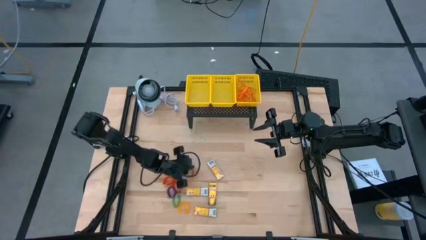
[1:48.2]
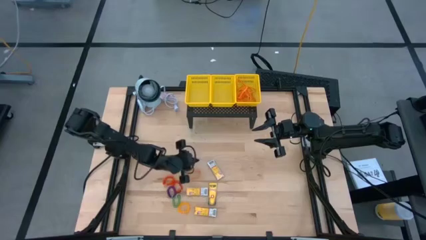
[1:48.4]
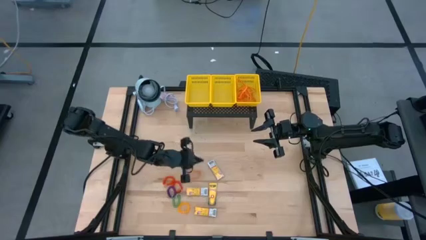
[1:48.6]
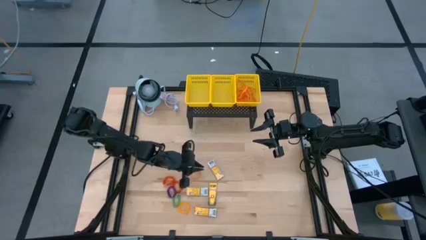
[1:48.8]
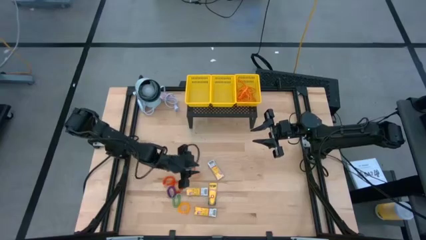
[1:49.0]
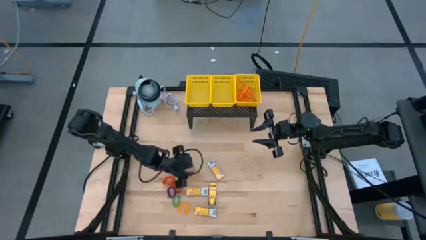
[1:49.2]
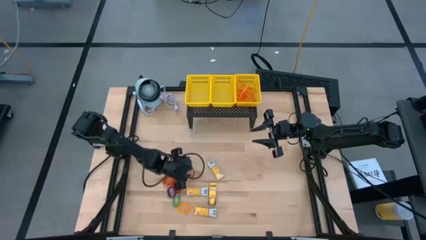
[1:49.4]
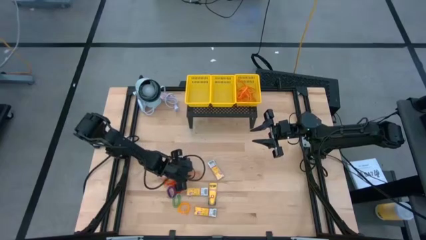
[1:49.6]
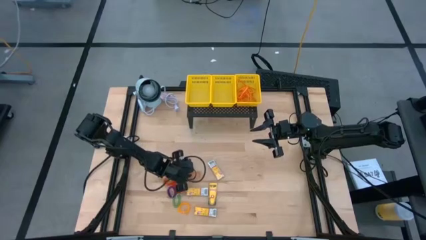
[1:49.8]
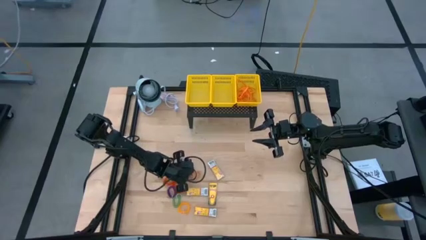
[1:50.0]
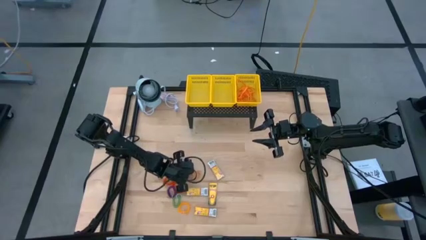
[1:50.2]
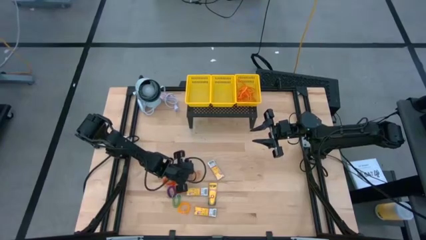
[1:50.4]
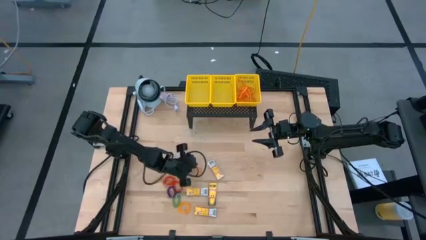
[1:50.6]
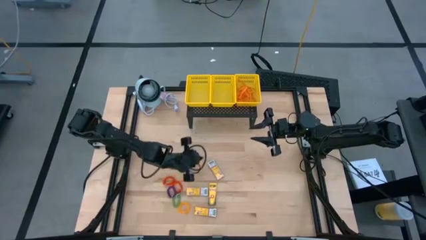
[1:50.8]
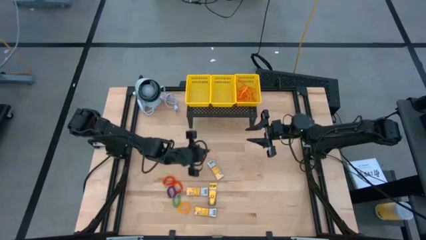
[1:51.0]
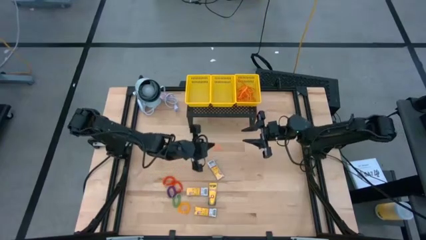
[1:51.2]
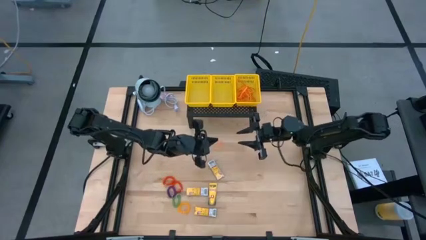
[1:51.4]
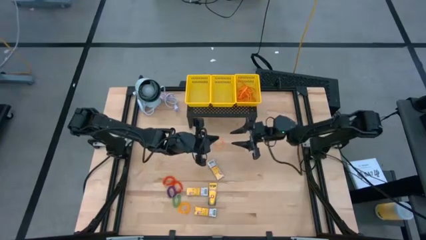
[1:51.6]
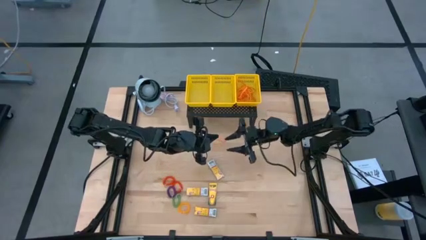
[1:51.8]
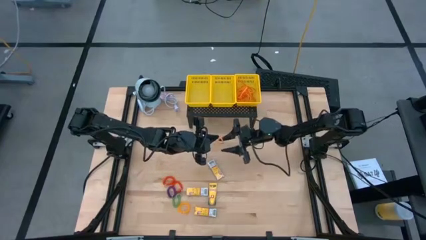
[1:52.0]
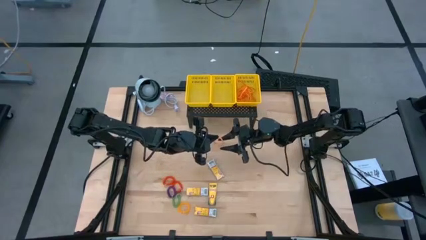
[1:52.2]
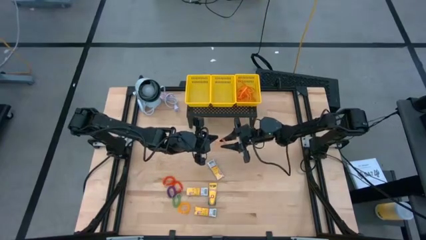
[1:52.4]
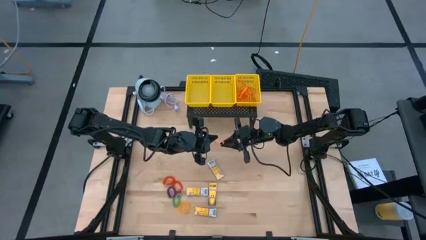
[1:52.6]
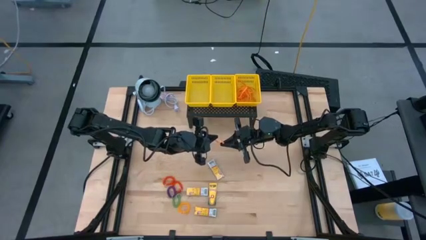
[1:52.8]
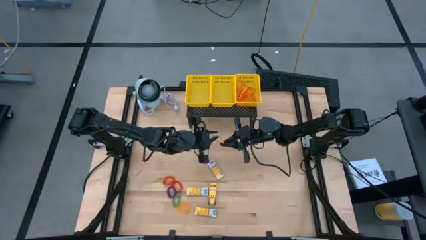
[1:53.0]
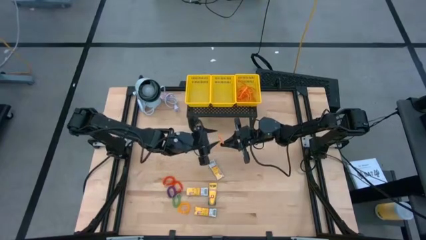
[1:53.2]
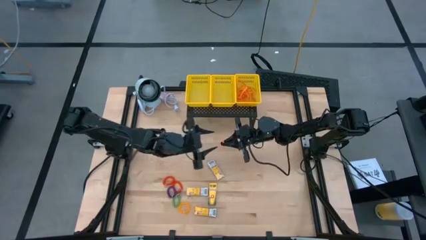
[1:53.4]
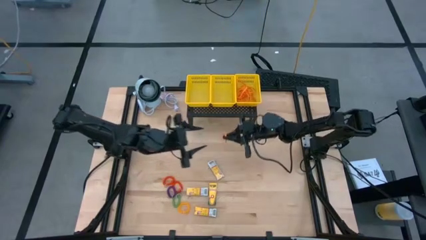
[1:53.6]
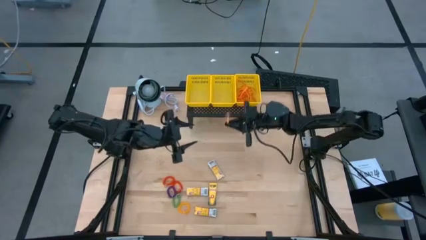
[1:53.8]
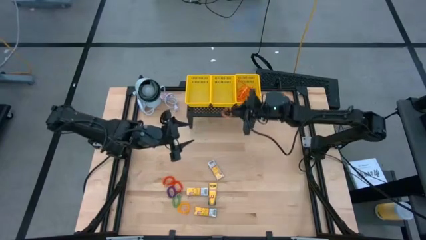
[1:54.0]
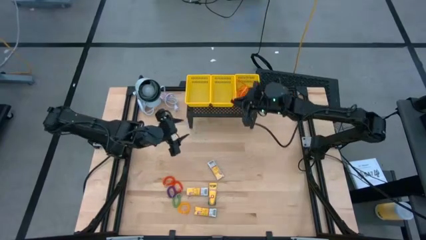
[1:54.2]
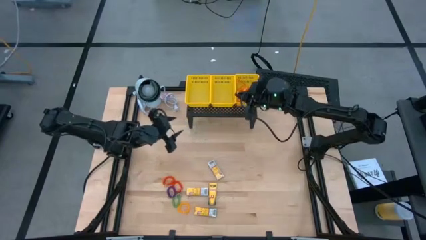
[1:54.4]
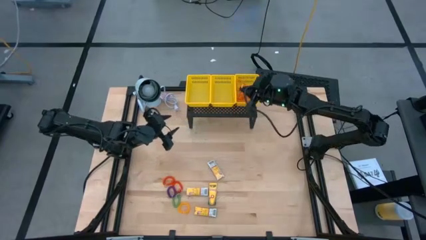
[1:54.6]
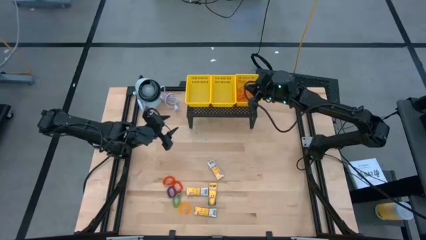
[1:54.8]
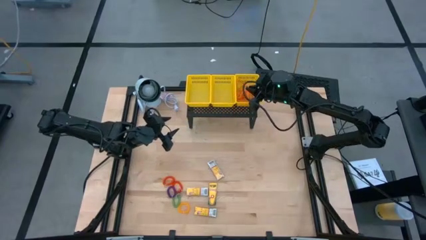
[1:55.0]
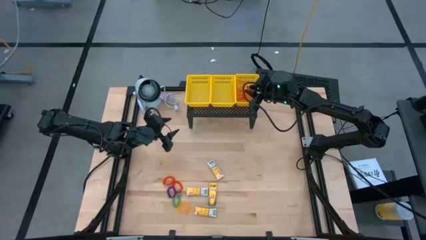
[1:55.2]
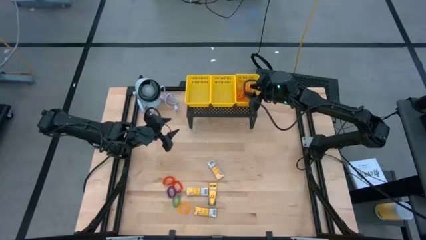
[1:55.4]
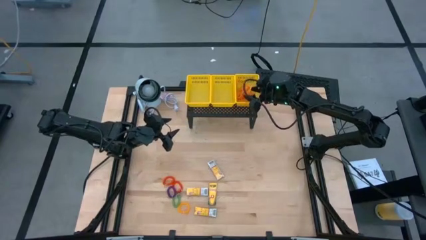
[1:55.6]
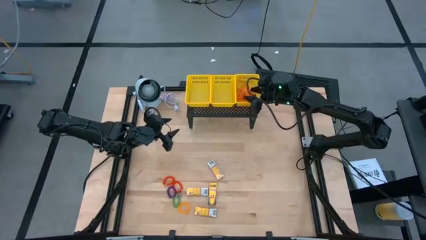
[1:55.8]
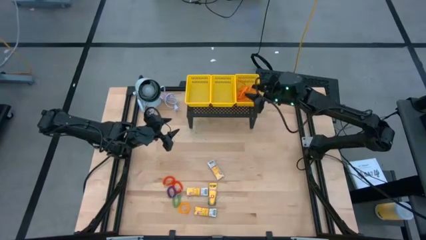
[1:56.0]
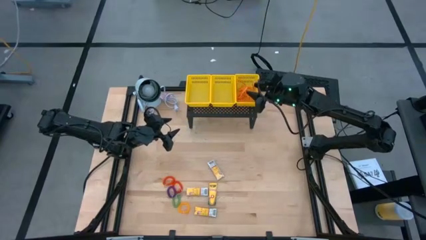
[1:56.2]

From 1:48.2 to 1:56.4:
Task: Pick & Place Office Desk Supplies
Put the orange rubber band into the right yellow bin on the shelf

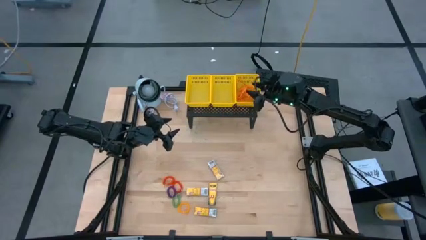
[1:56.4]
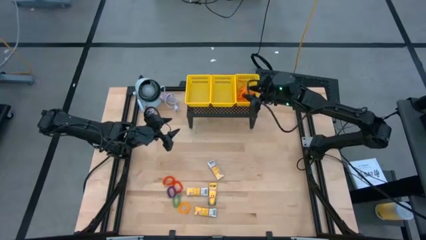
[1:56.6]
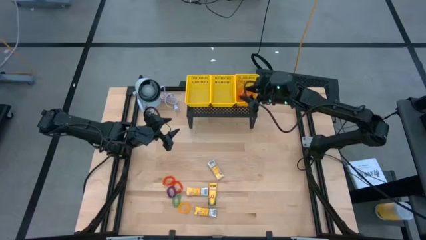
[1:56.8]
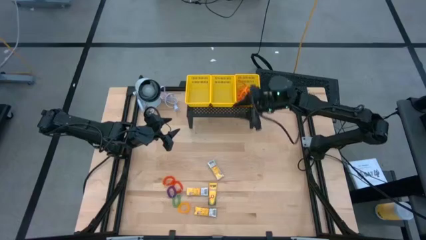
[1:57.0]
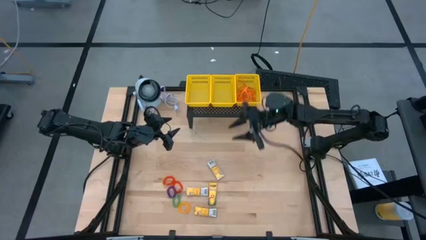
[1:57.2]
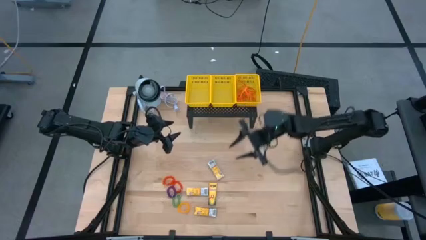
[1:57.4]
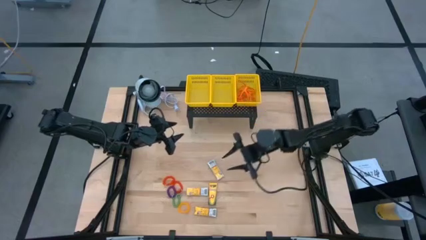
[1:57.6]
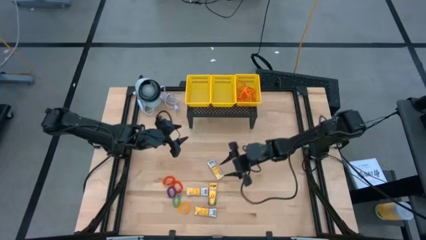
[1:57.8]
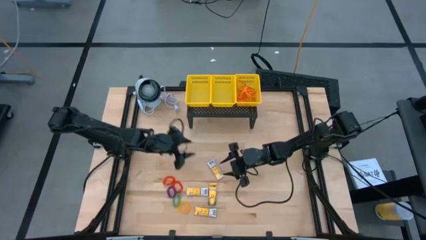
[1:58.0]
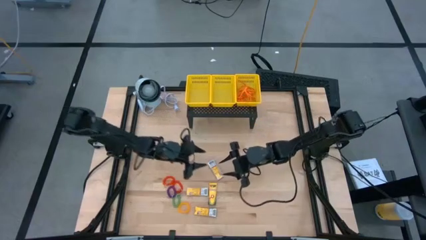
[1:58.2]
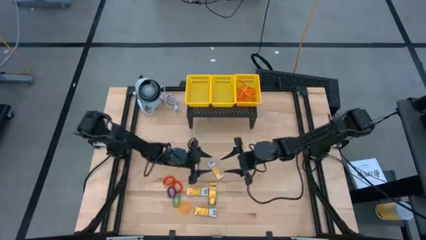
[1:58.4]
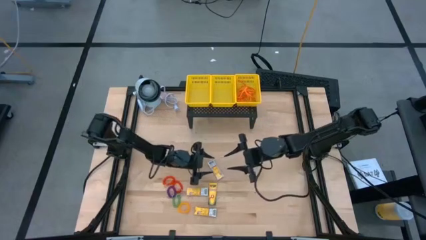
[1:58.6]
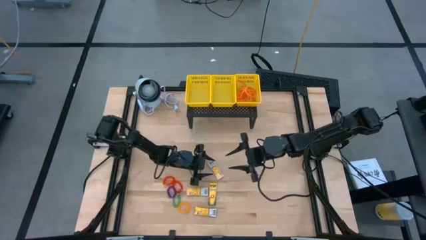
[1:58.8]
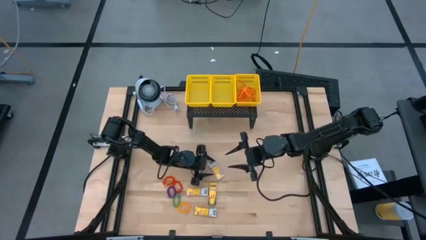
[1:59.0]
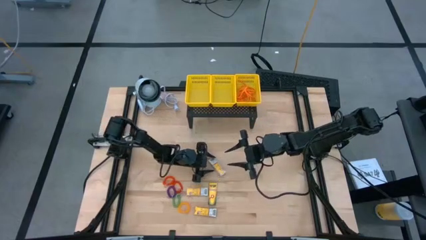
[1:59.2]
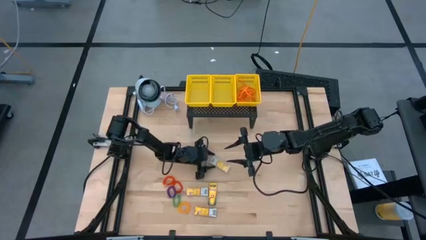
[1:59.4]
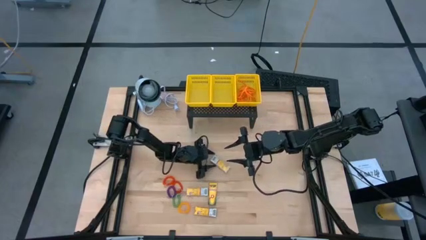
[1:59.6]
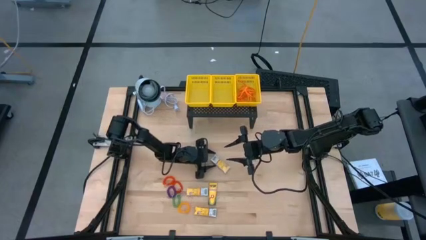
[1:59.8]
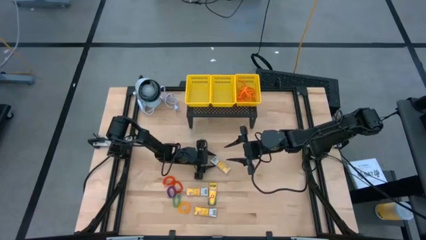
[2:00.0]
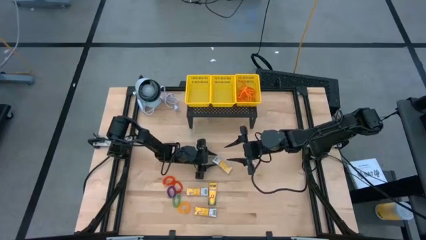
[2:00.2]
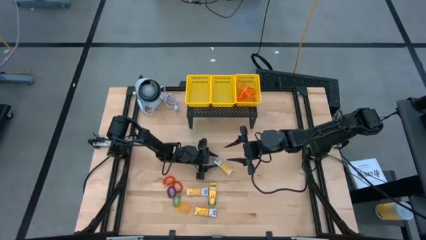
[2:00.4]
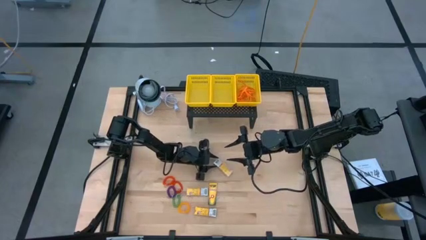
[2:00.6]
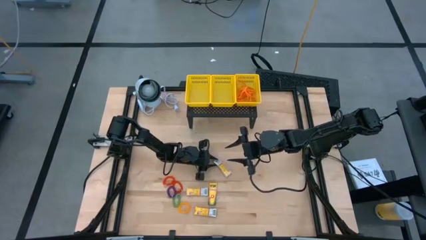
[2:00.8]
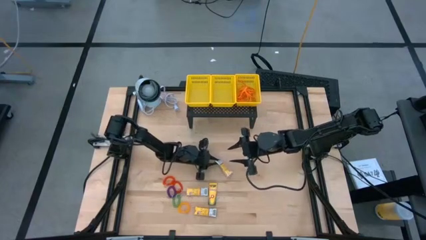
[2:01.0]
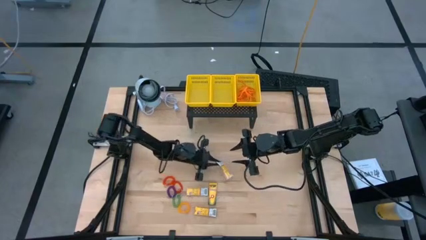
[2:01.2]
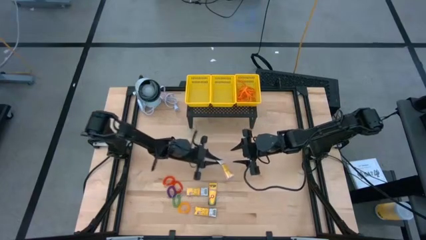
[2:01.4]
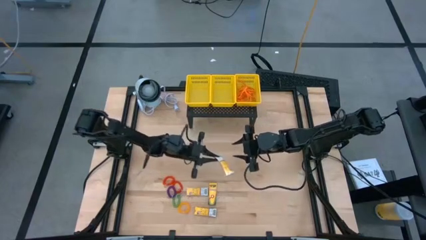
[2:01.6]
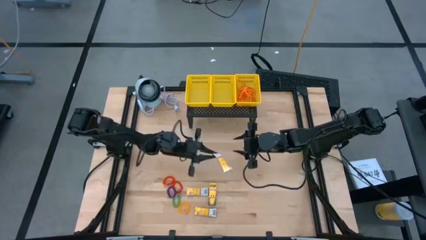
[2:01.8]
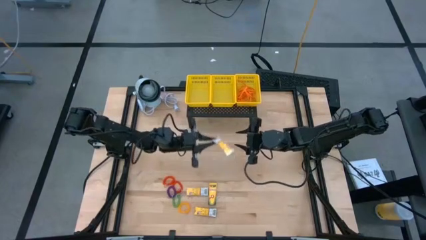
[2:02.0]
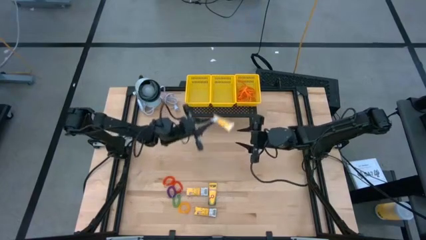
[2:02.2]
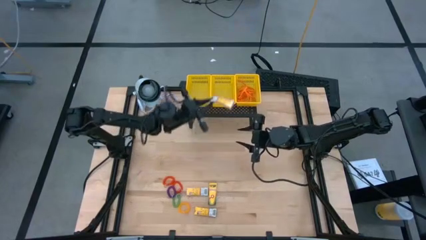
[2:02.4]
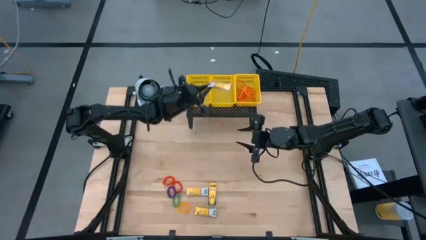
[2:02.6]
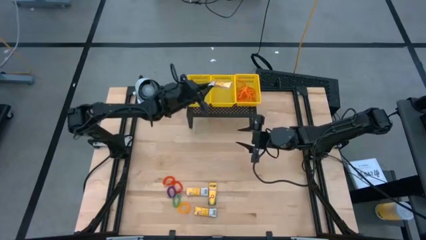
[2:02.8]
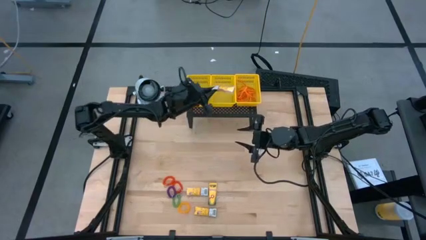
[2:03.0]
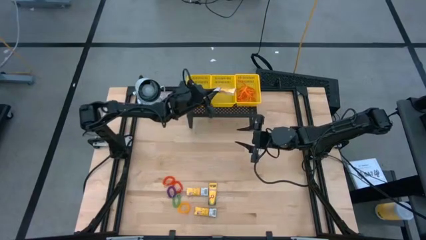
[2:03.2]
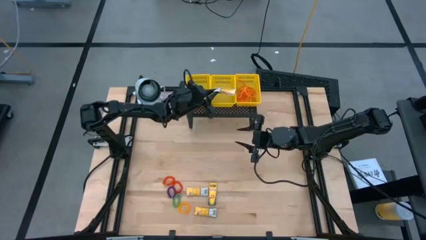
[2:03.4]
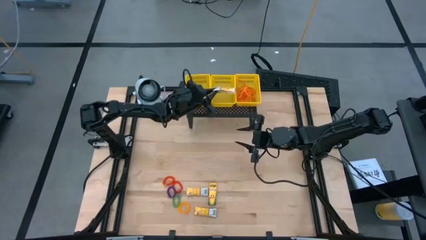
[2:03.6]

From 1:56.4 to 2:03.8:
Put the crayons box into the middle yellow bin on the shelf

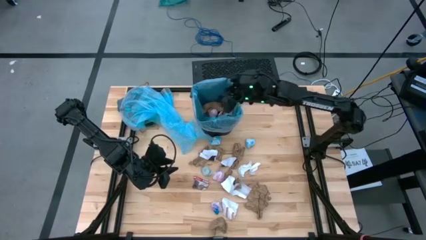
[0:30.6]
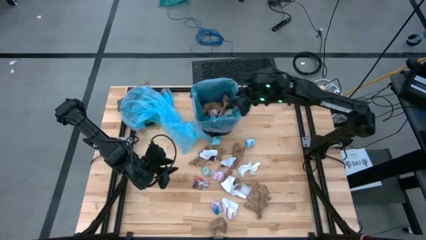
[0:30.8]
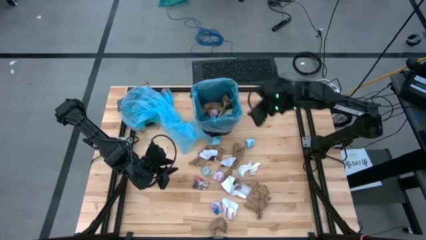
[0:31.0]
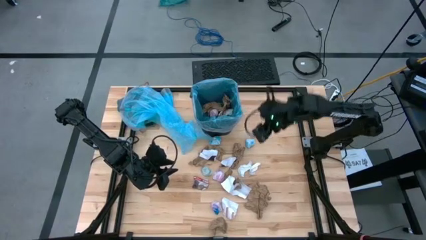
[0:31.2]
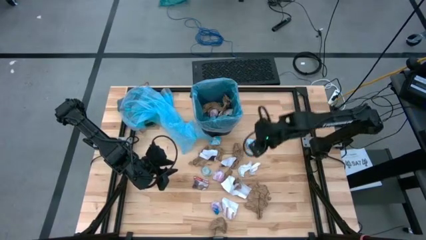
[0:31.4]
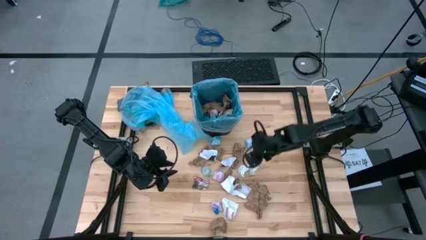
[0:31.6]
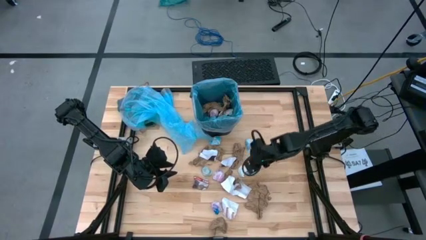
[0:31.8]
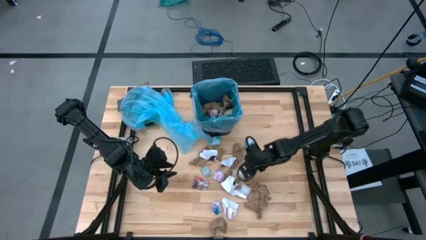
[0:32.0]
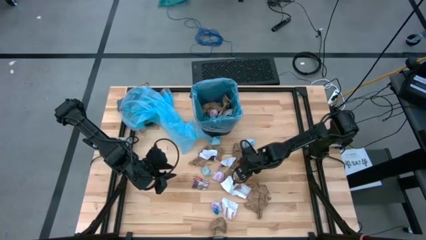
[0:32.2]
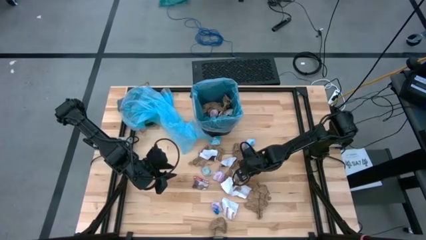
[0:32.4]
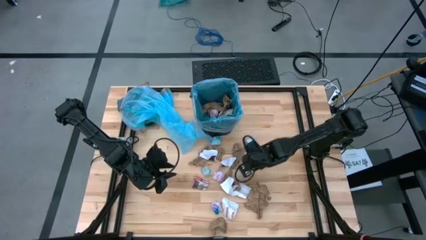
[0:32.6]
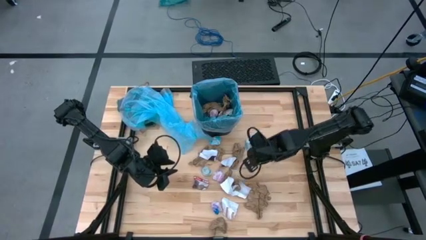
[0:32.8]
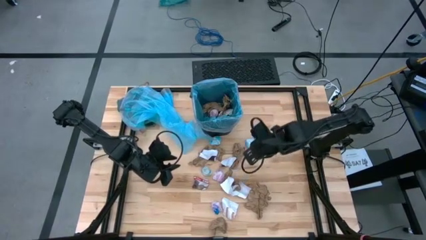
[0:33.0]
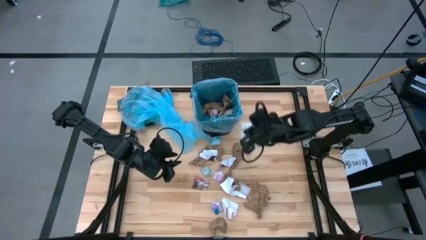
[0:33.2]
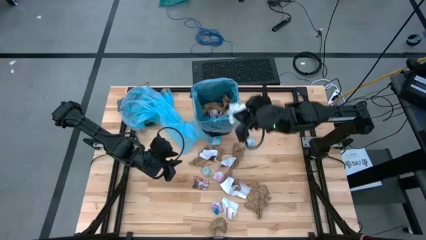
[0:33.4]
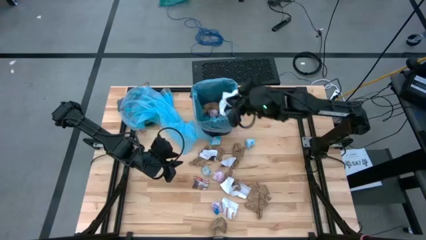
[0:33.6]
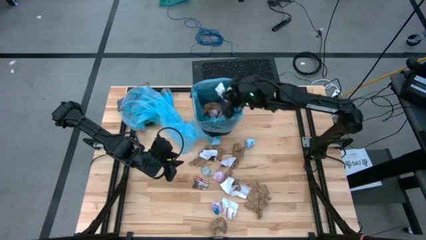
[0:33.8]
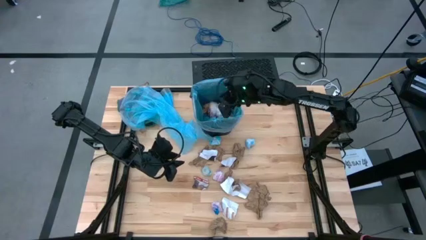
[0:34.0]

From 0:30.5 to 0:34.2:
Task: place trash/remove bag and relplace
Put the white paper into the trash bin
